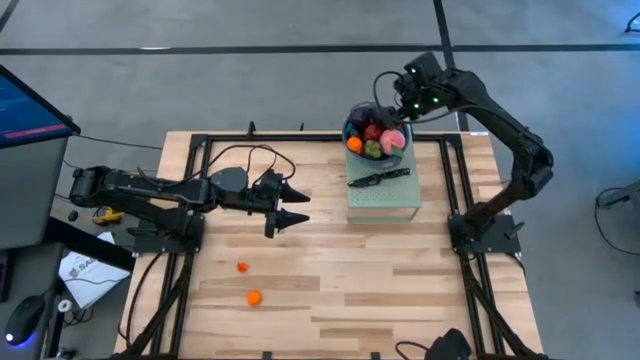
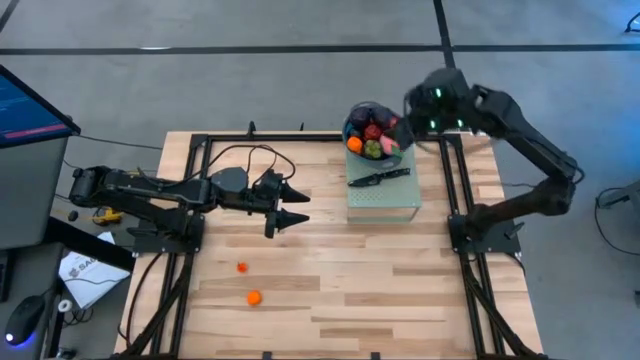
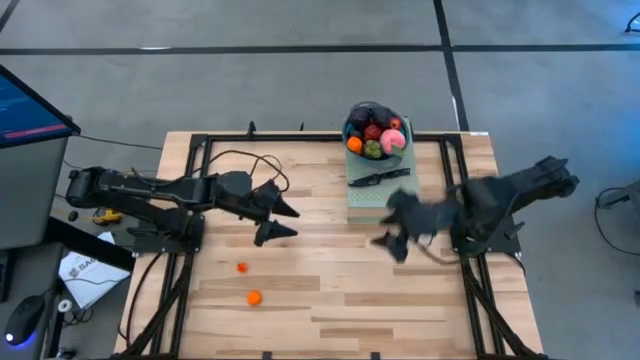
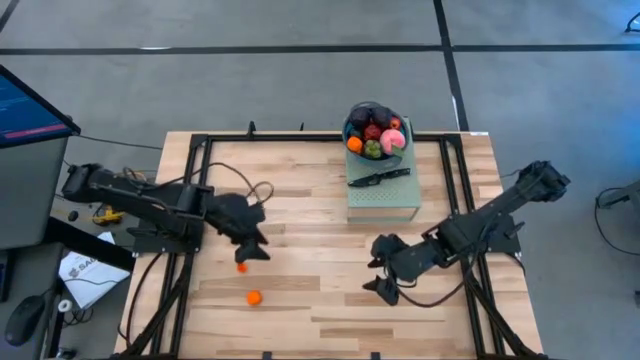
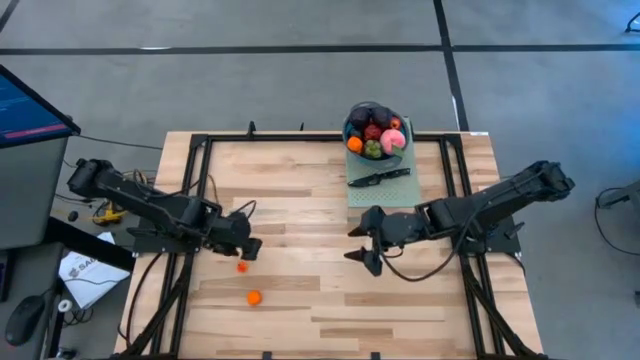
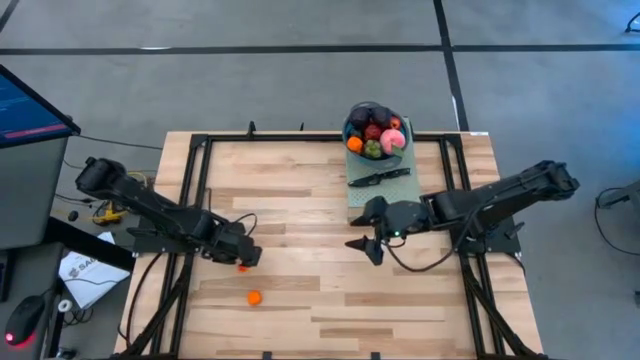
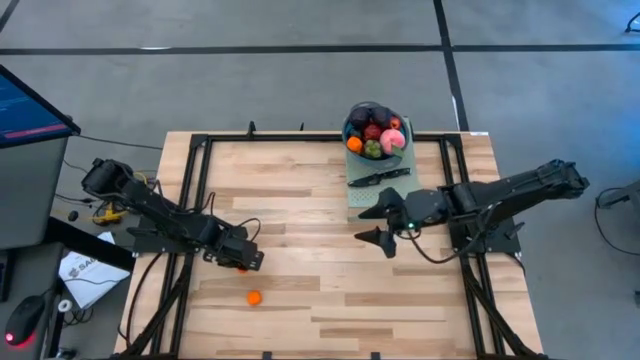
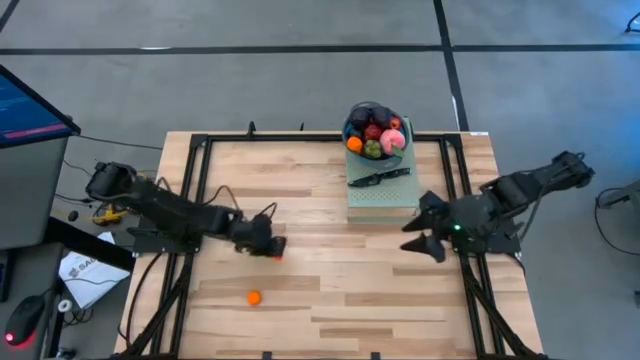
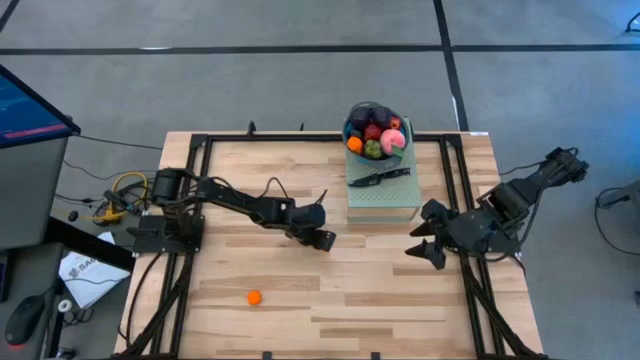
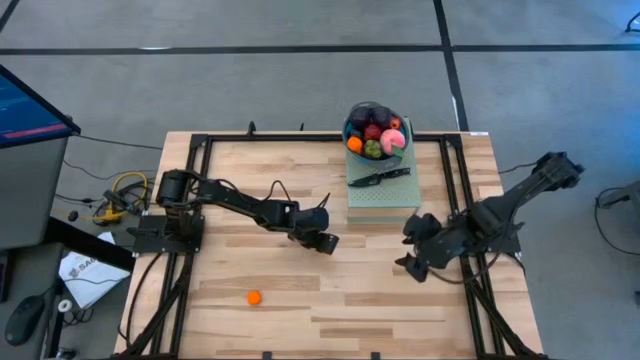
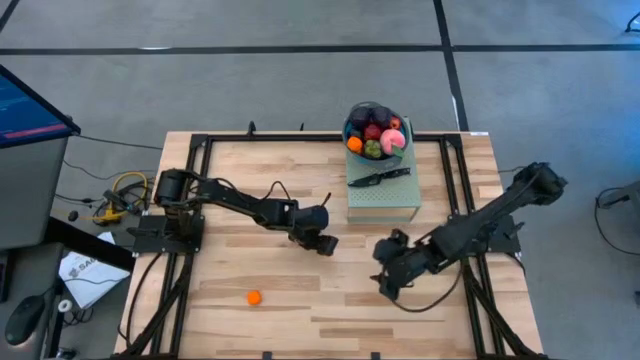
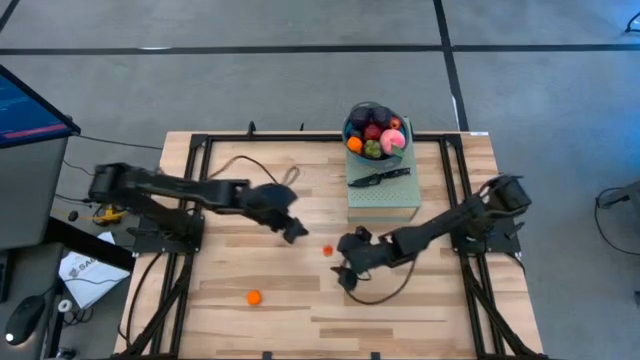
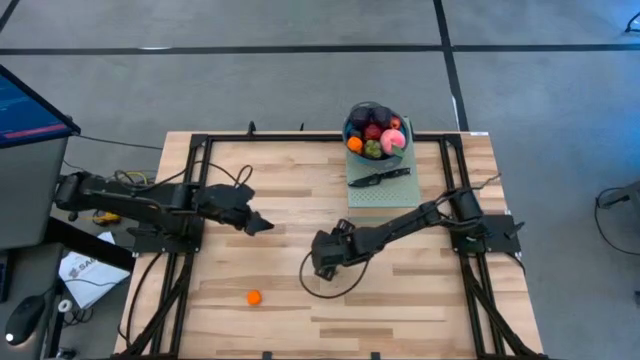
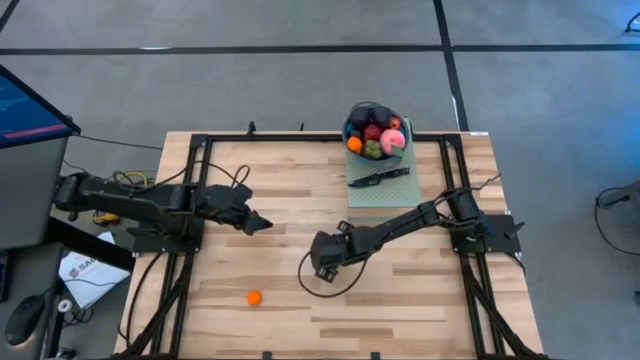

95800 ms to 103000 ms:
Task: Pick & Place Fruit
Put the orange peach into the blue strainer bowl on the shelf

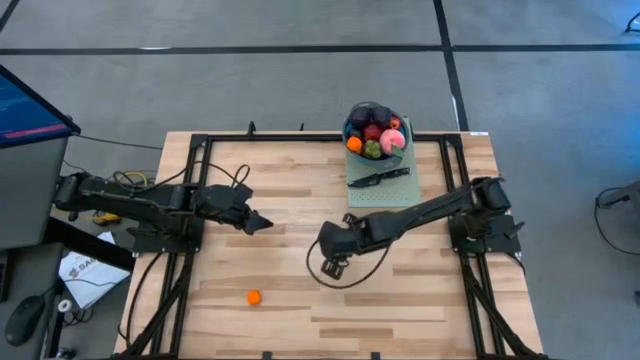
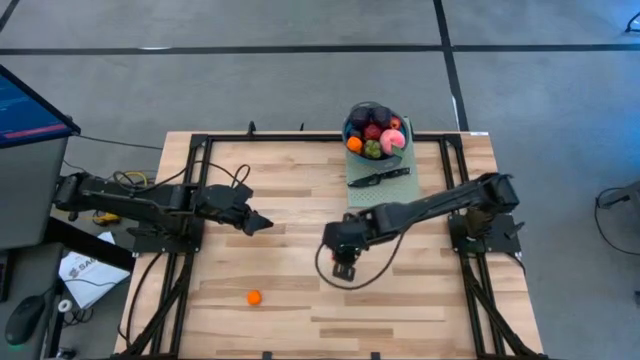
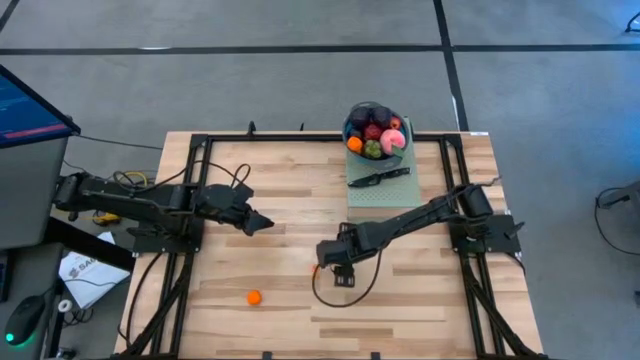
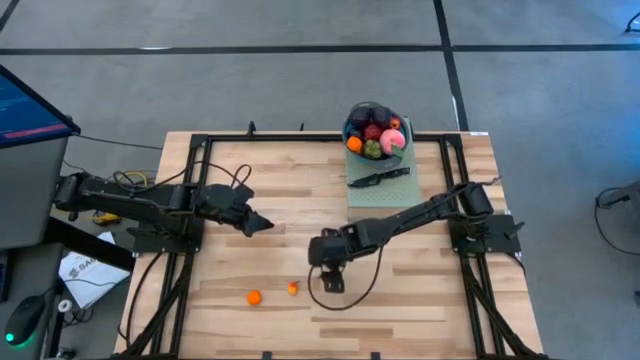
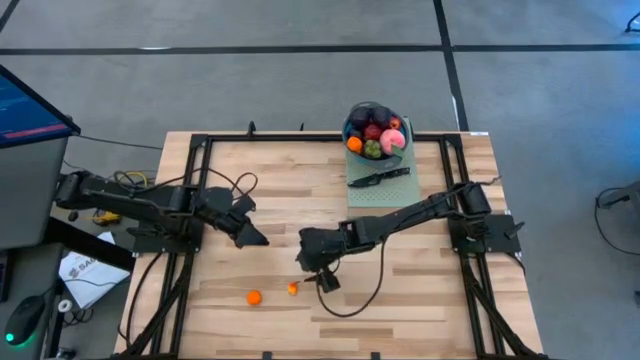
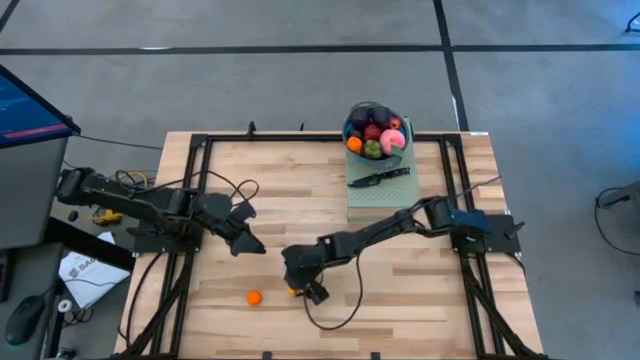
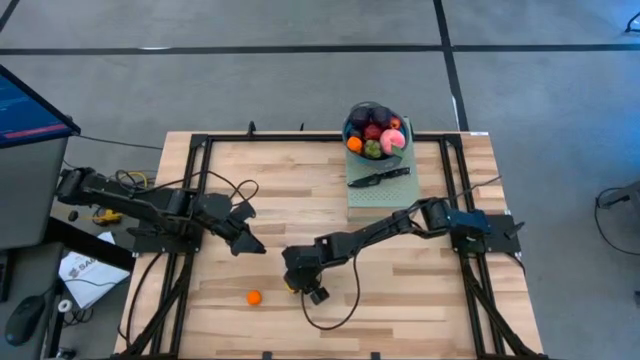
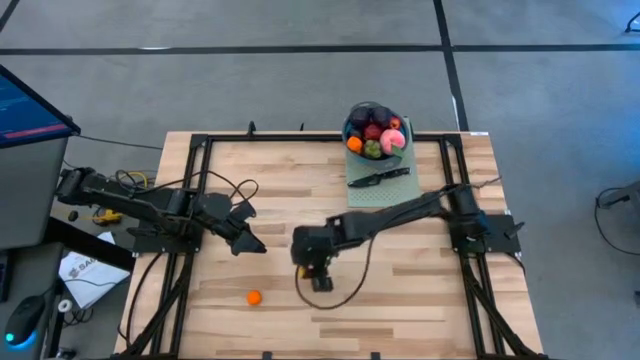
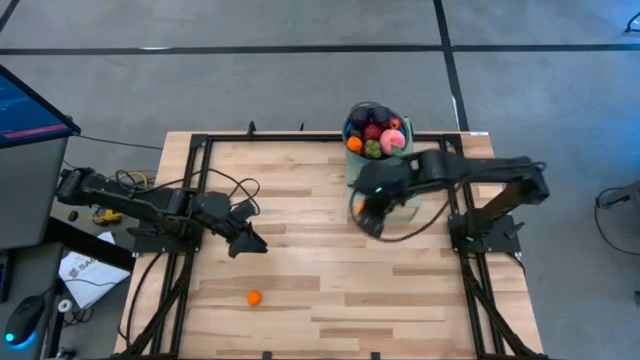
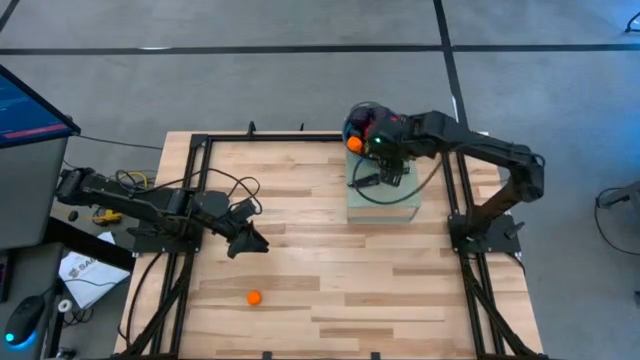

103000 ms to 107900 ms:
Put the orange peach into the blue strainer bowl on the shelf

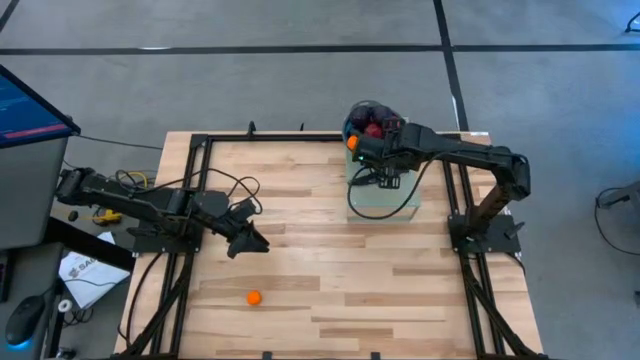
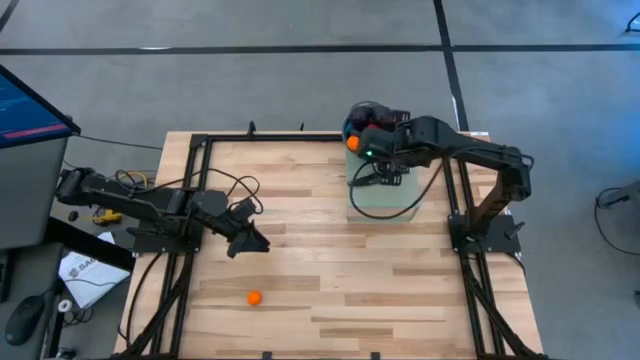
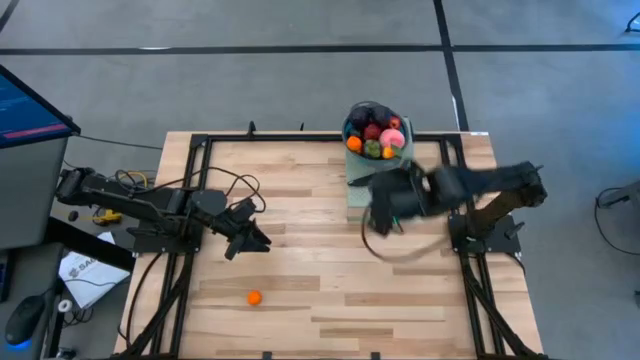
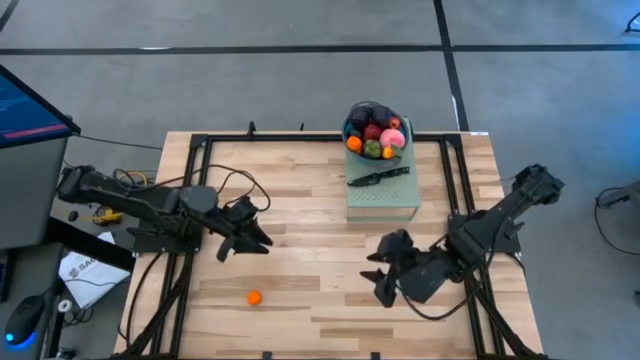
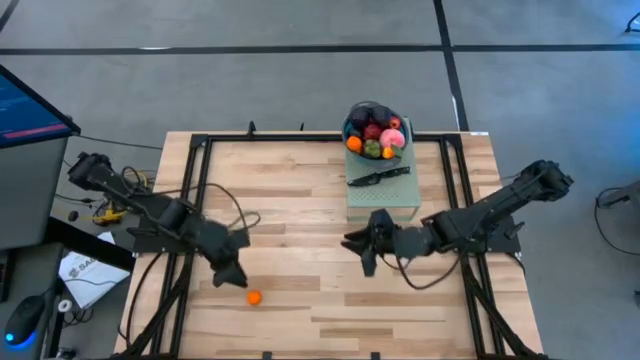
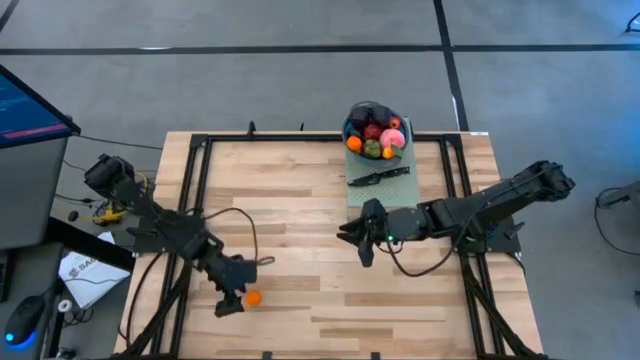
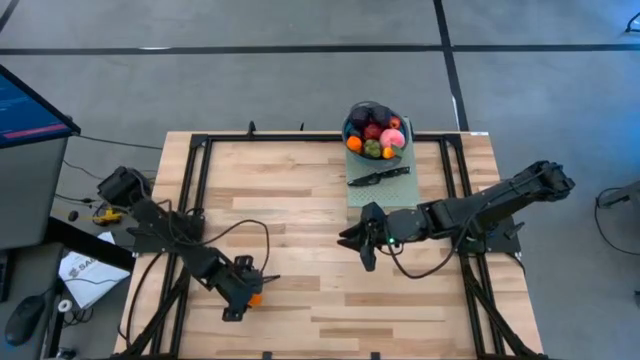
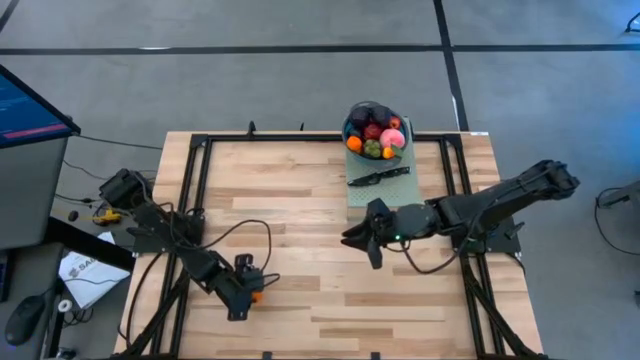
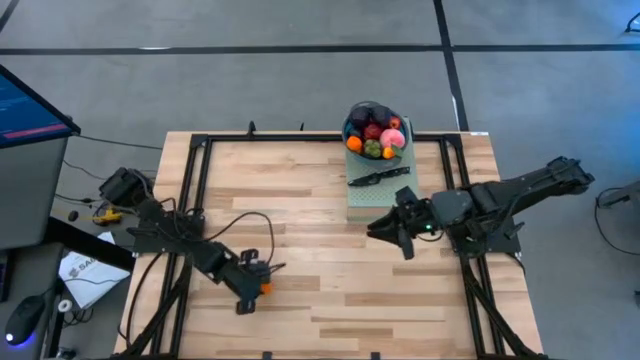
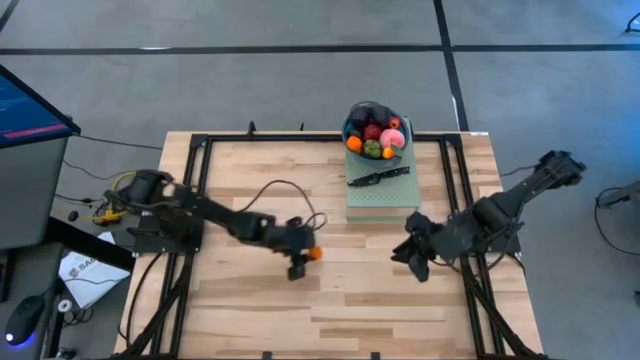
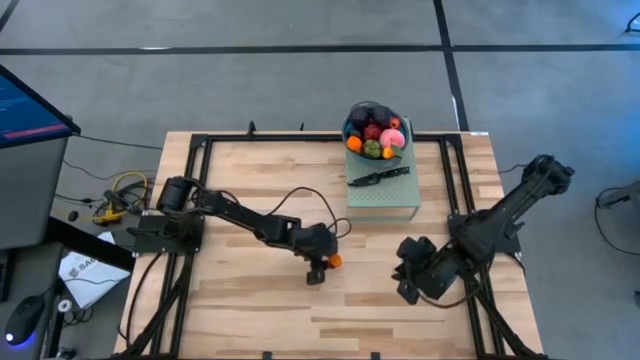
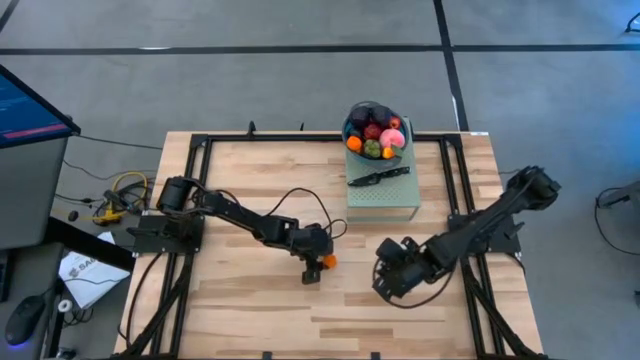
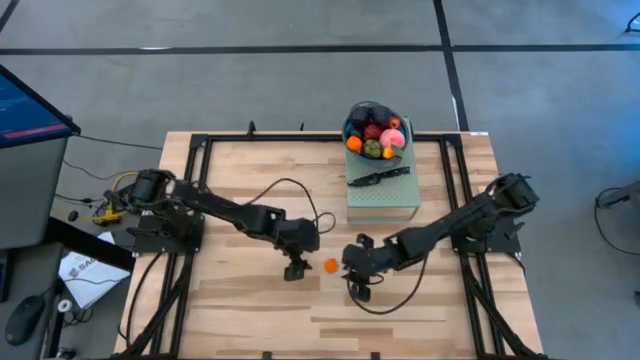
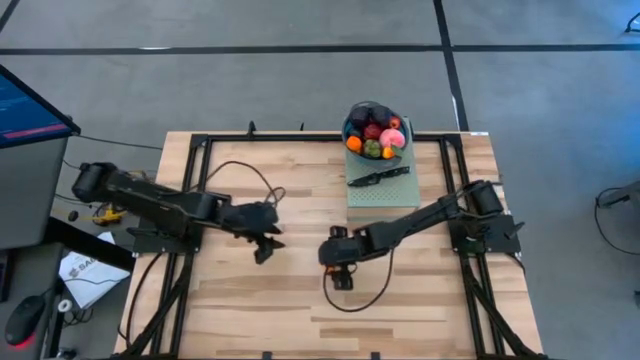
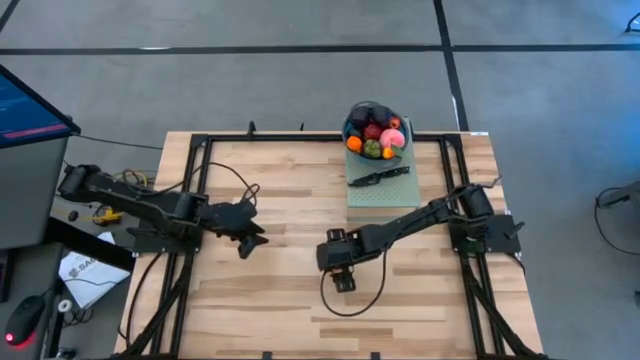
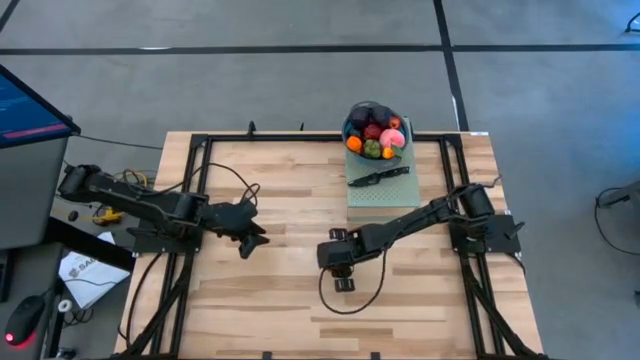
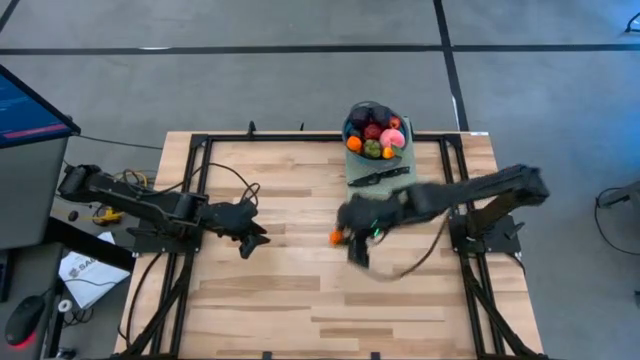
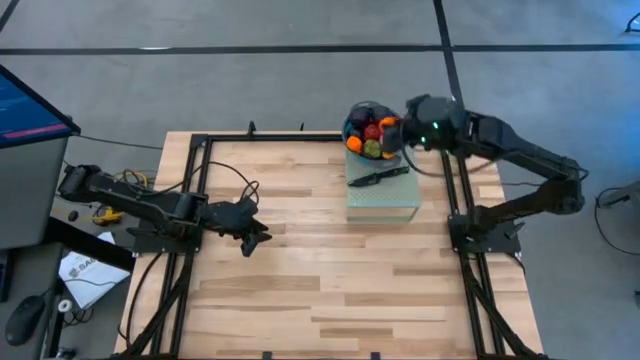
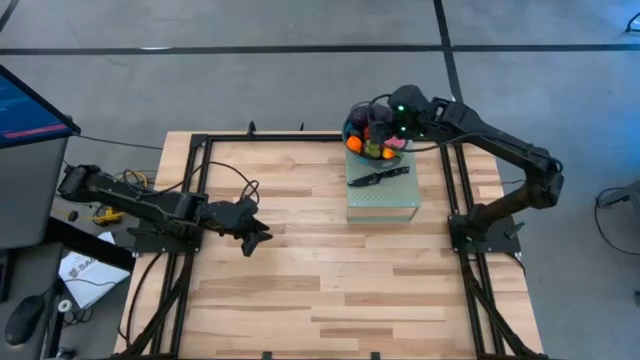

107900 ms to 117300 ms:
Put the orange tangerine into the blue strainer bowl on the shelf
